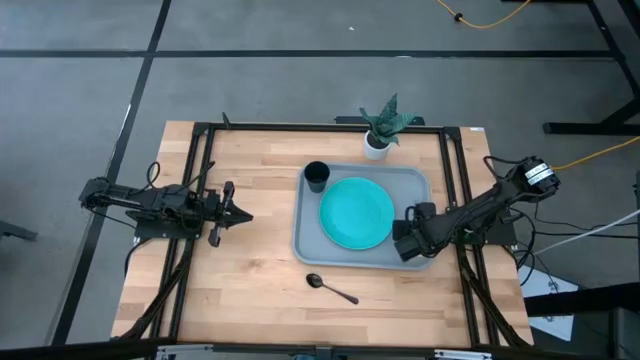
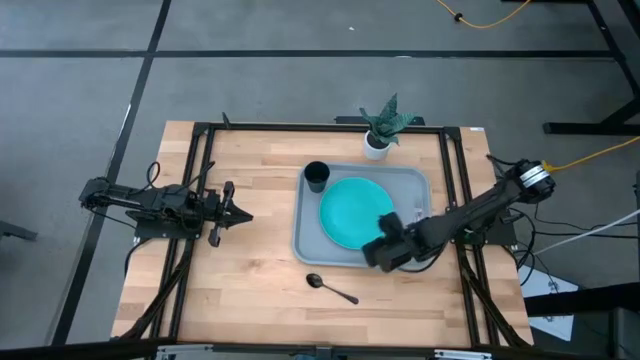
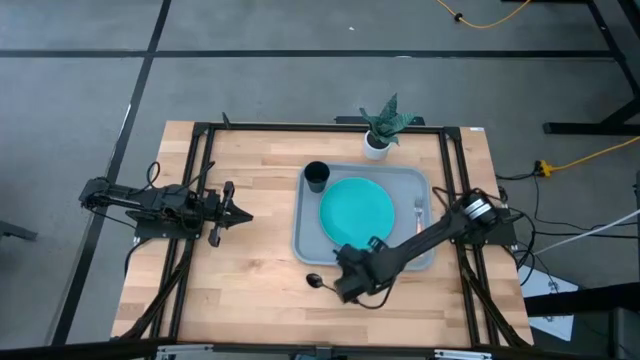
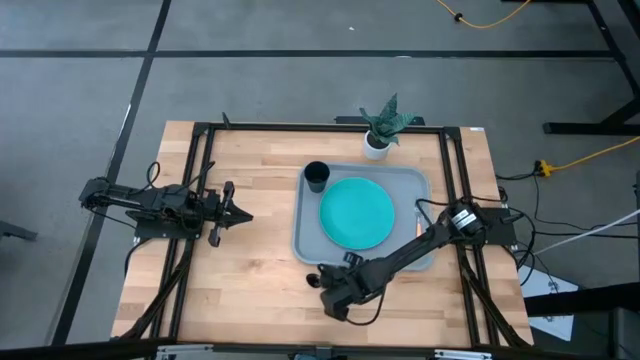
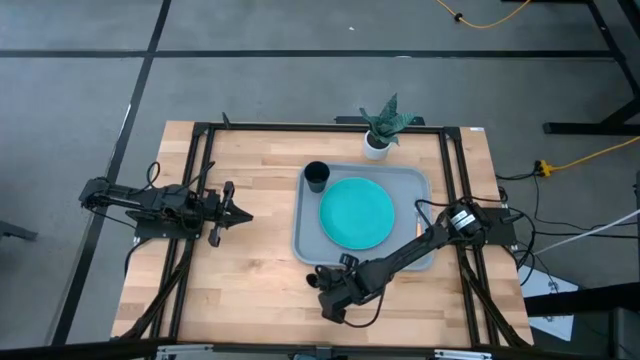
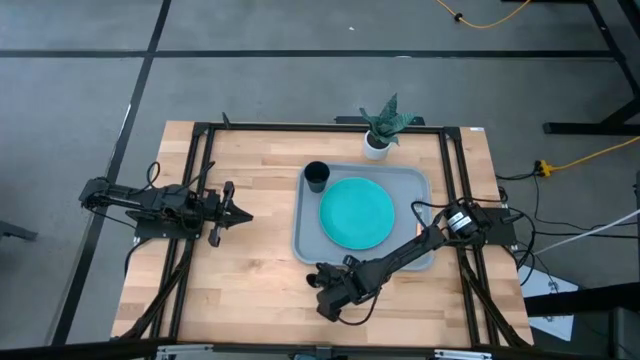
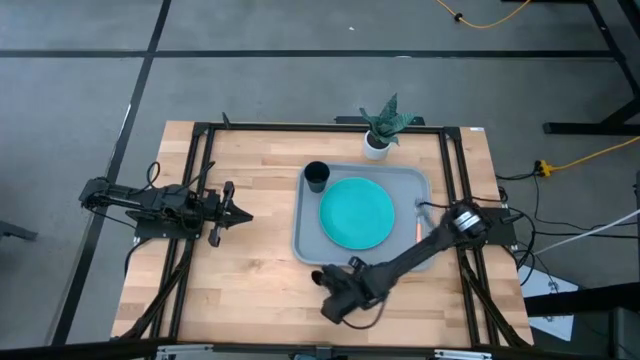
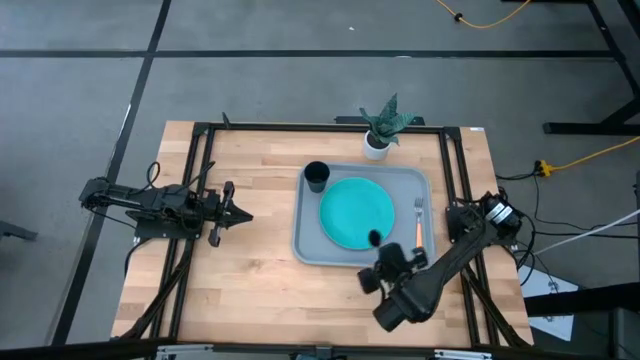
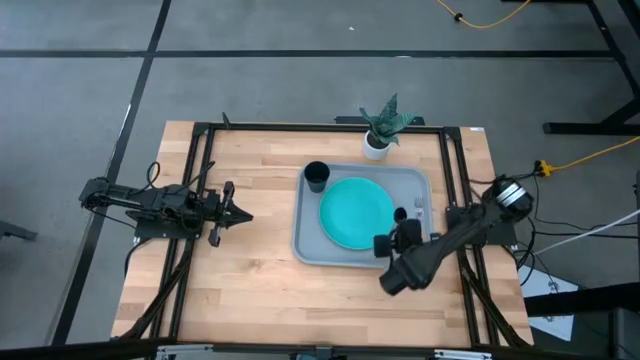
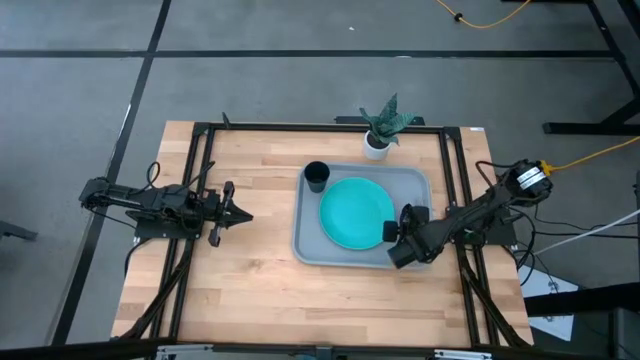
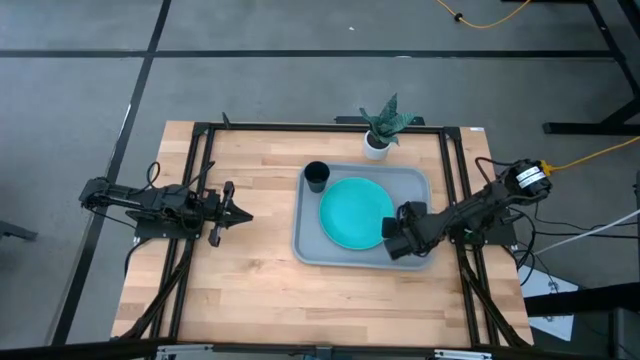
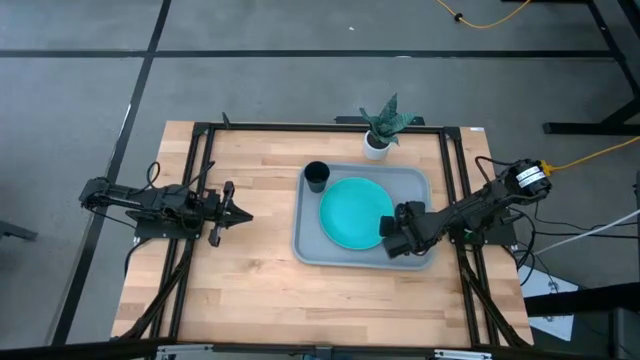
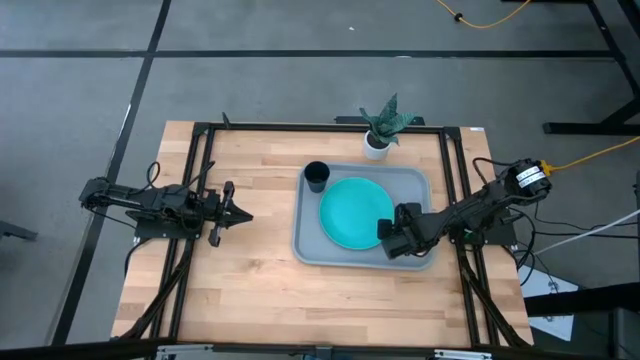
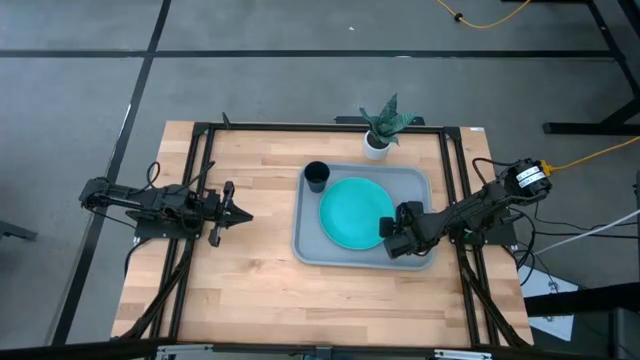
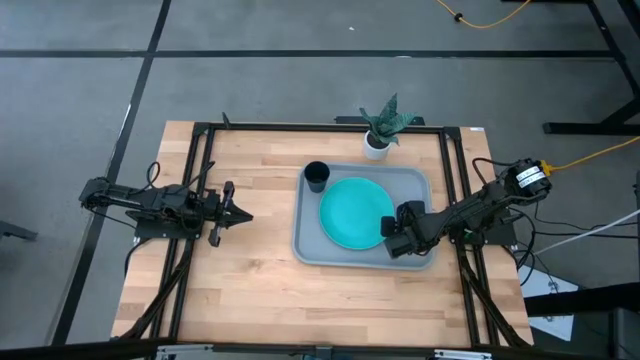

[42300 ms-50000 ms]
Task: Pick and place plate/cup/fork/spoon on tray
Put the black spoon on the grey tray to the right of the blue plate

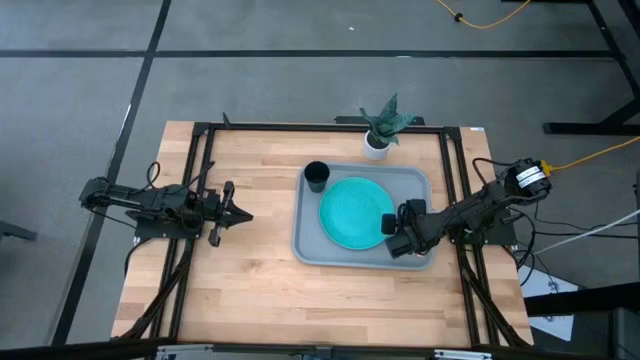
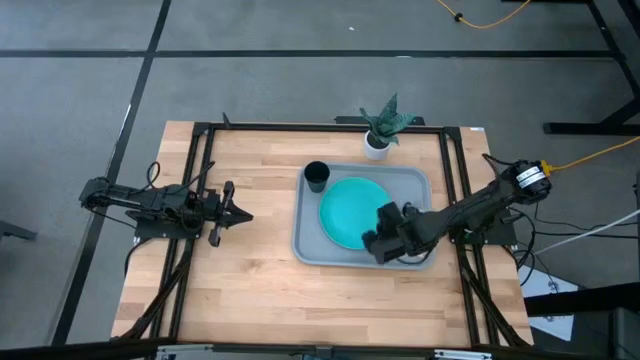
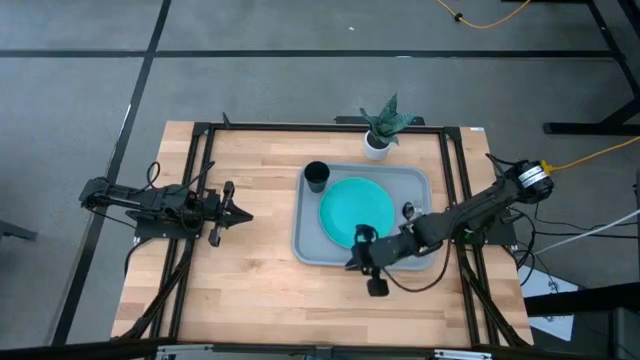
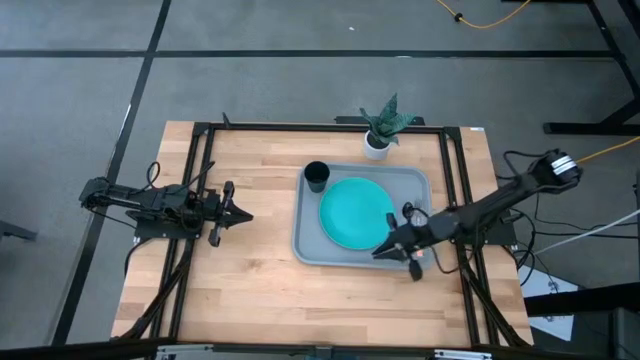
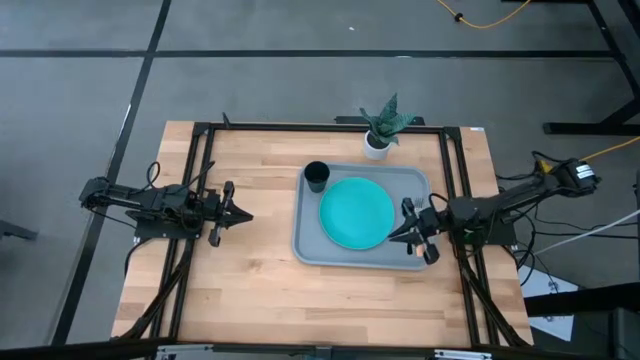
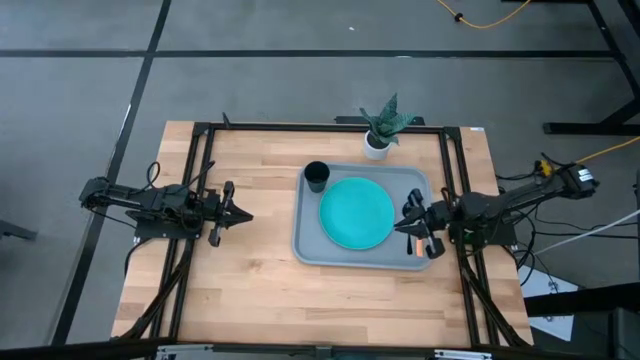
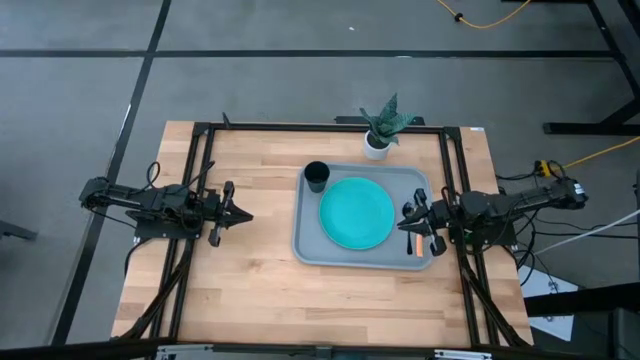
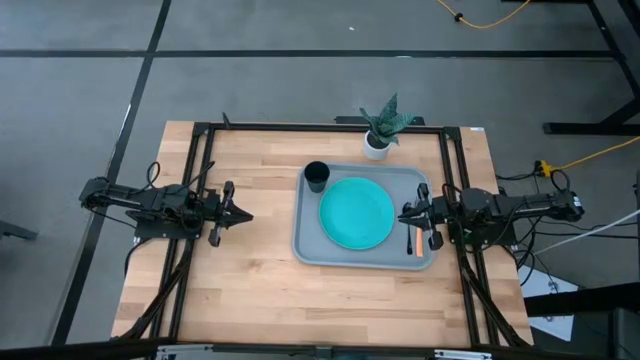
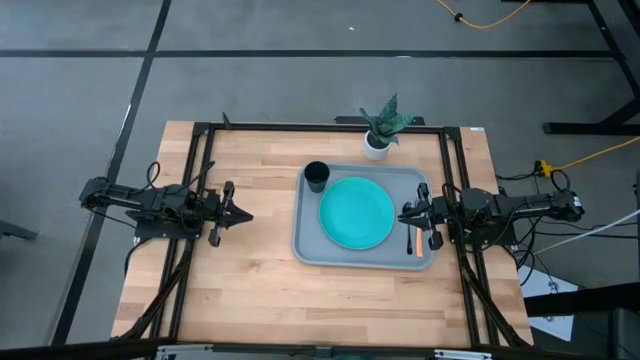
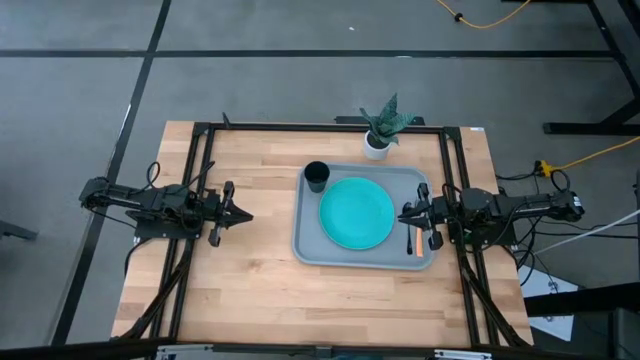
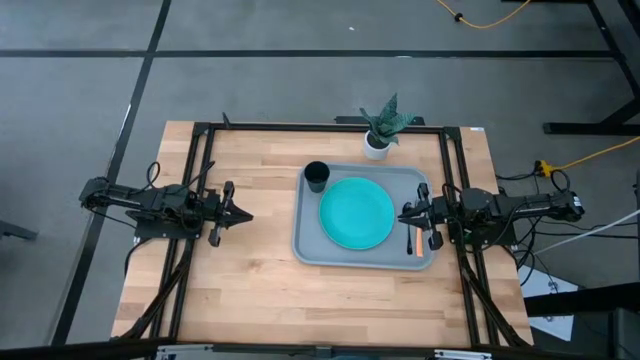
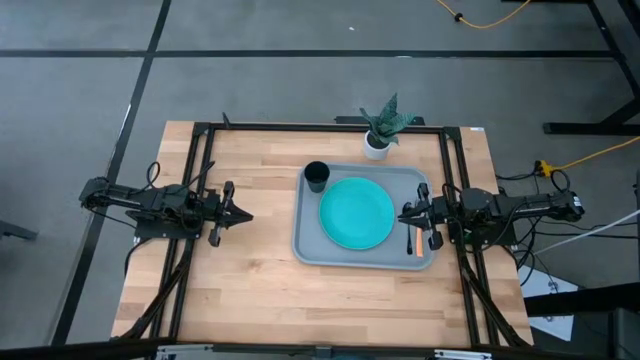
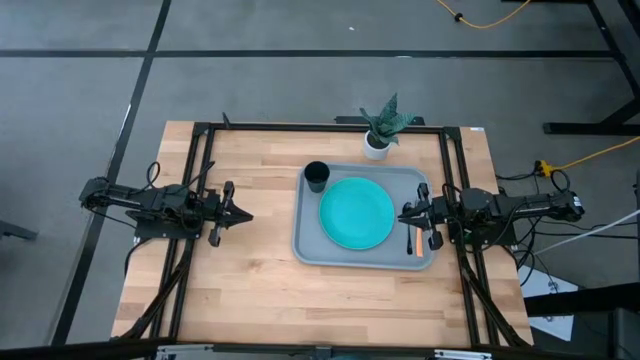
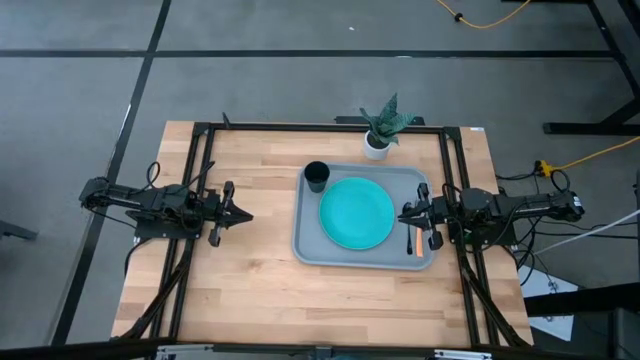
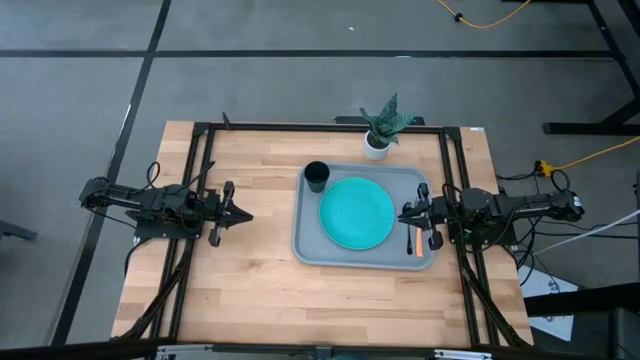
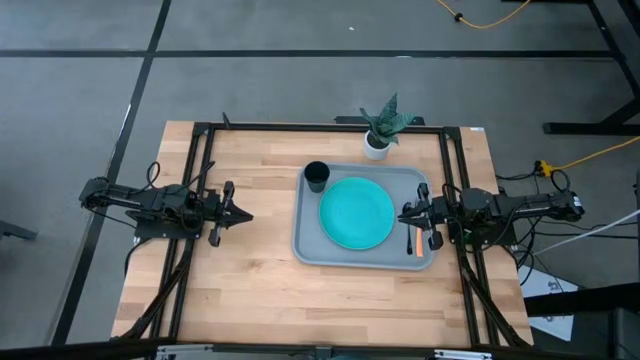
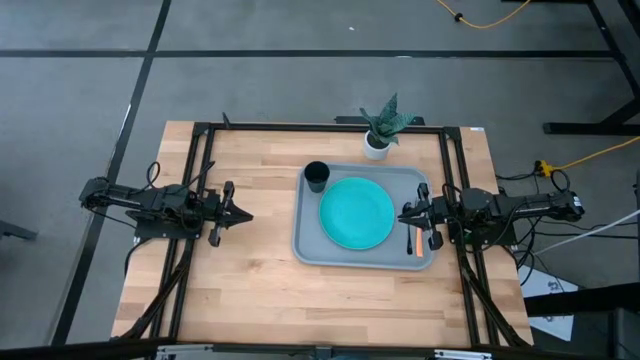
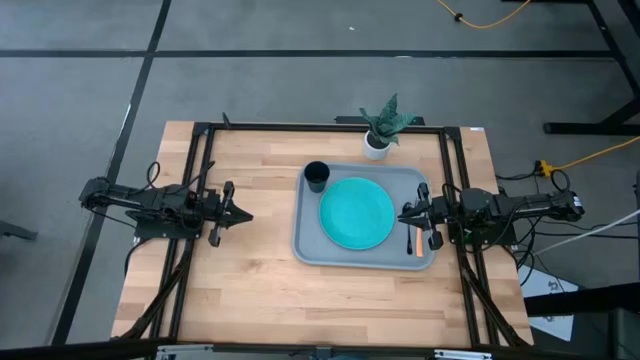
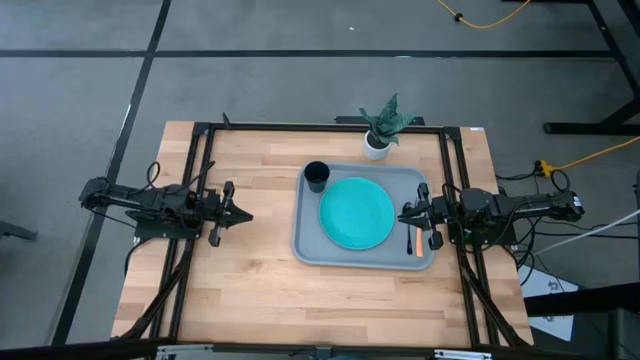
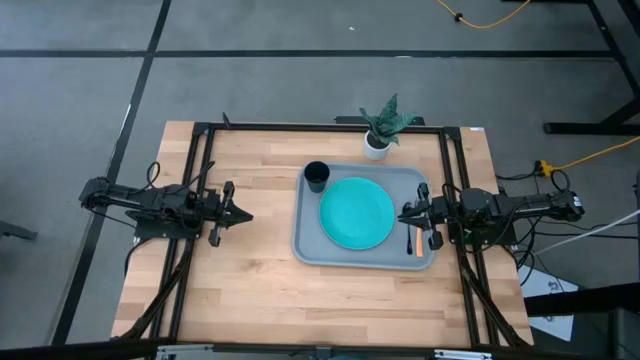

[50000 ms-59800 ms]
Return to Home Position

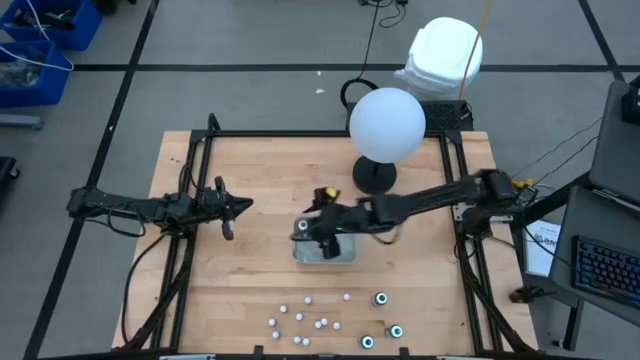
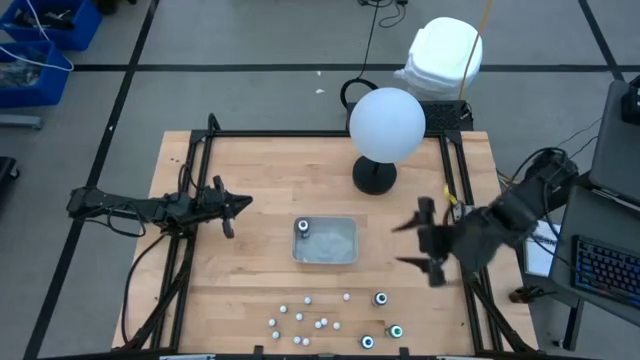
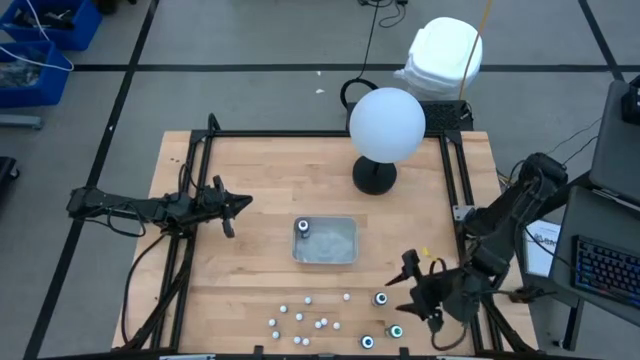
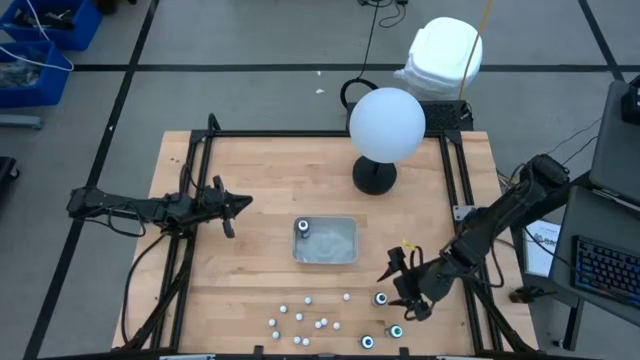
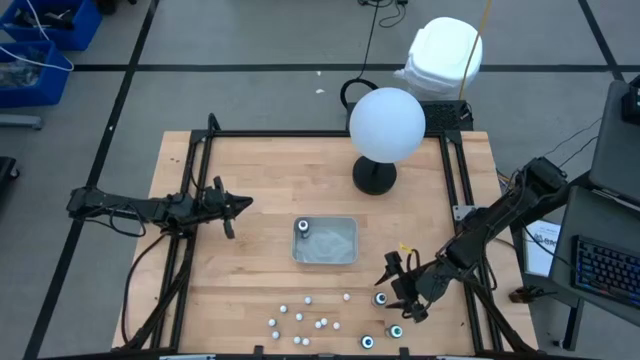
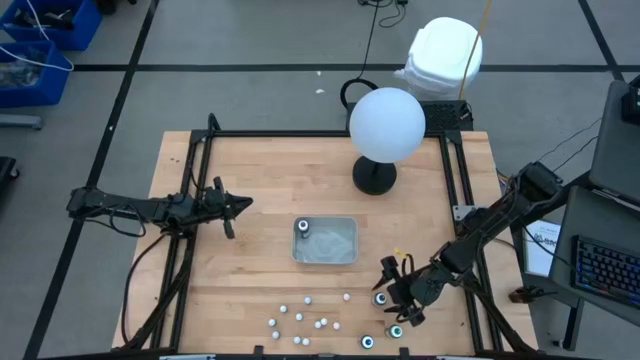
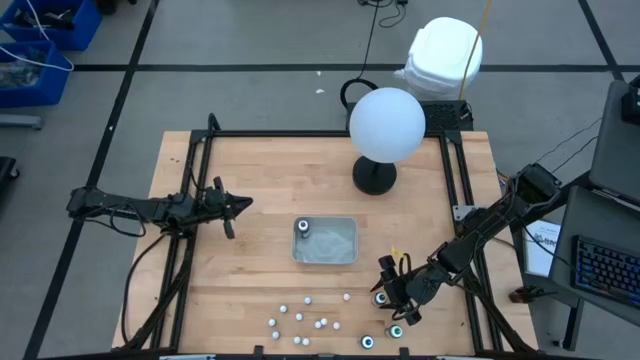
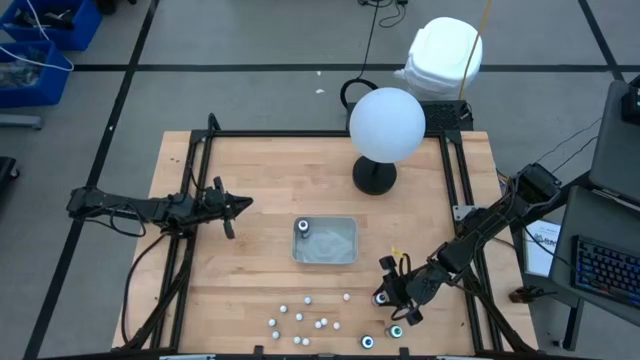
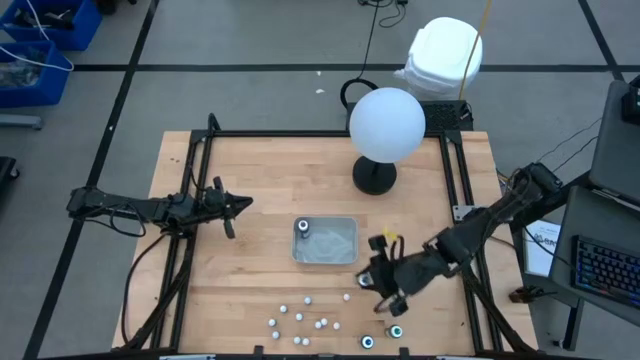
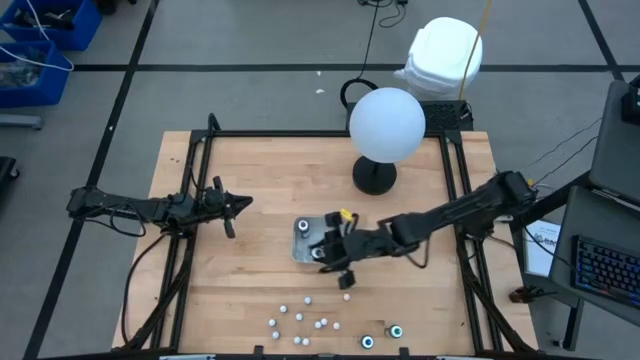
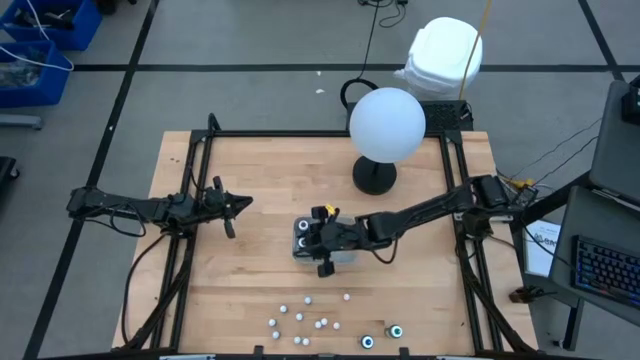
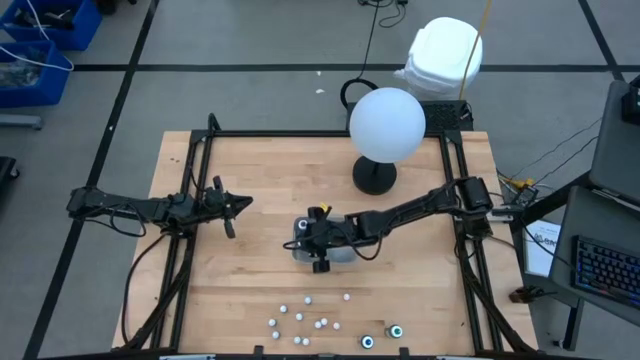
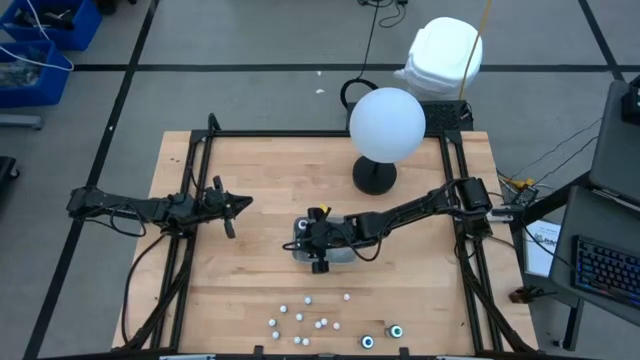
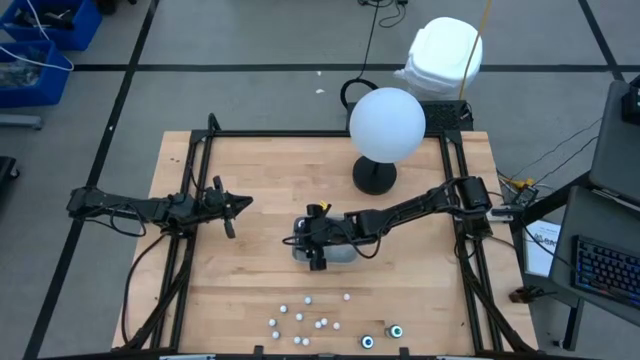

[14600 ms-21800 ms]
Task: Pick & Place food coloring
Put the large black food coloring bottle into the gray bin
